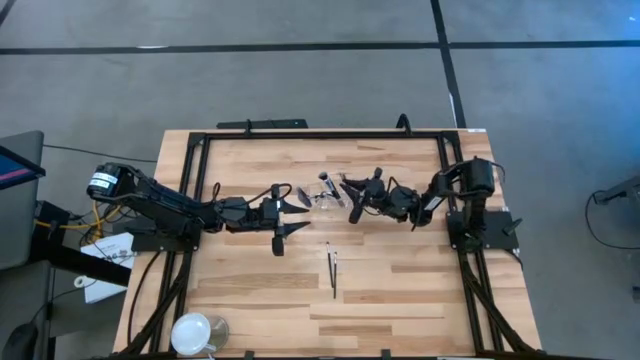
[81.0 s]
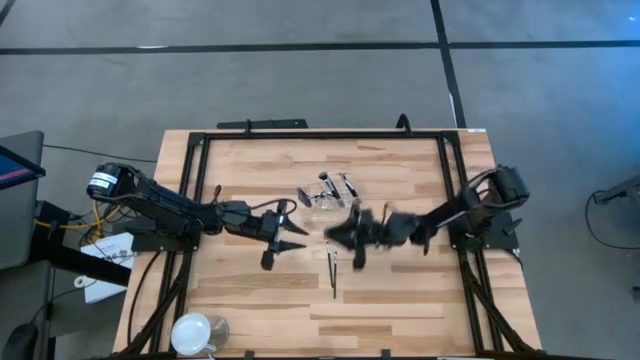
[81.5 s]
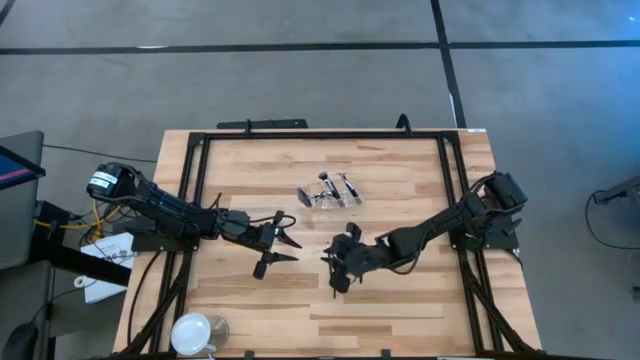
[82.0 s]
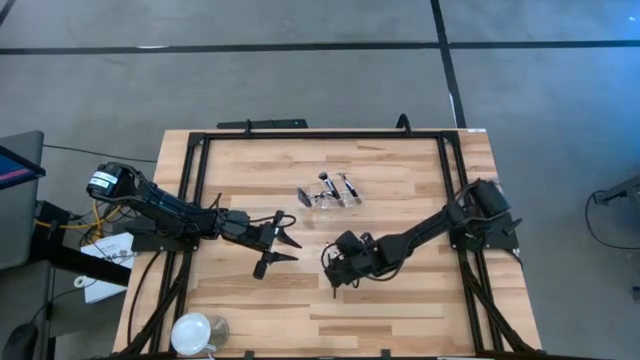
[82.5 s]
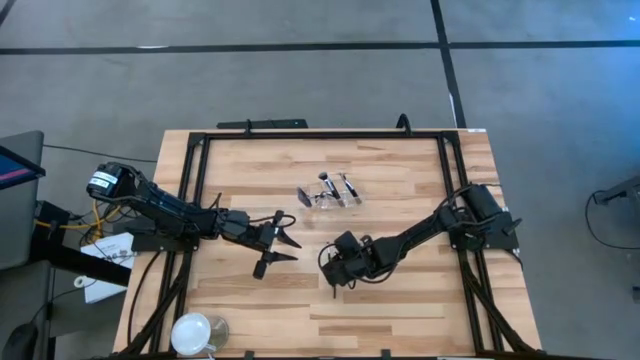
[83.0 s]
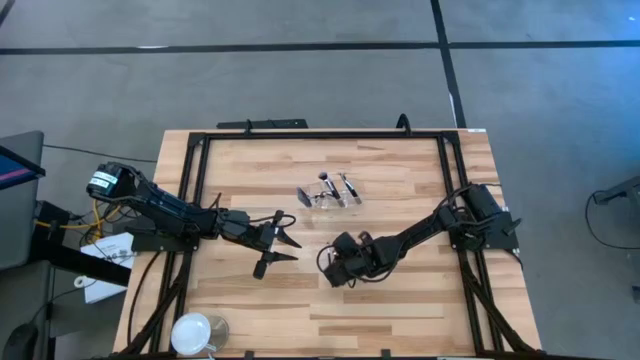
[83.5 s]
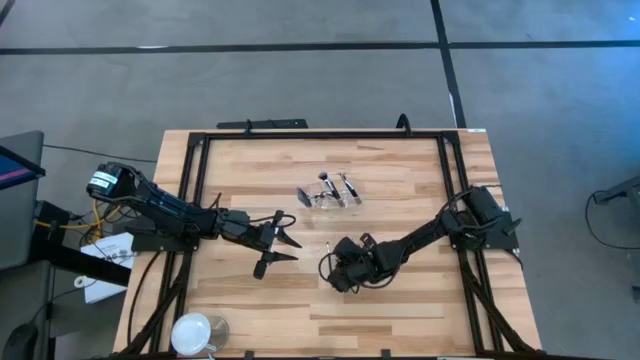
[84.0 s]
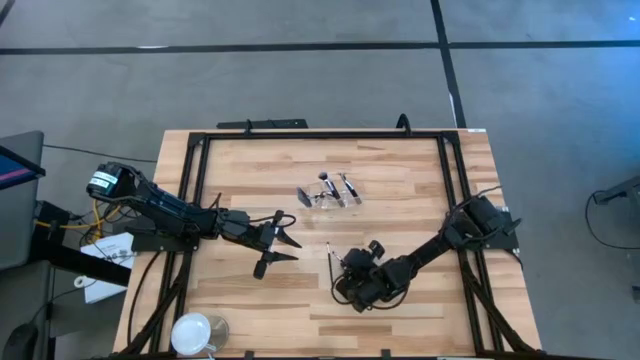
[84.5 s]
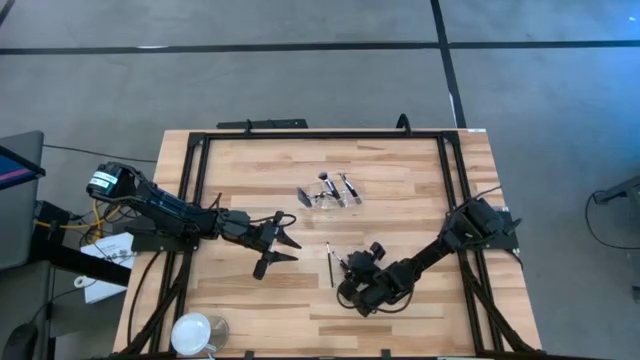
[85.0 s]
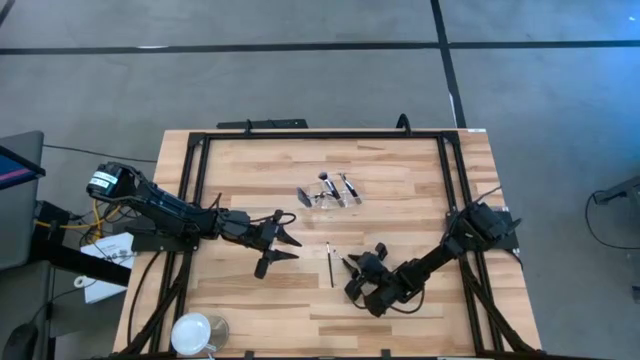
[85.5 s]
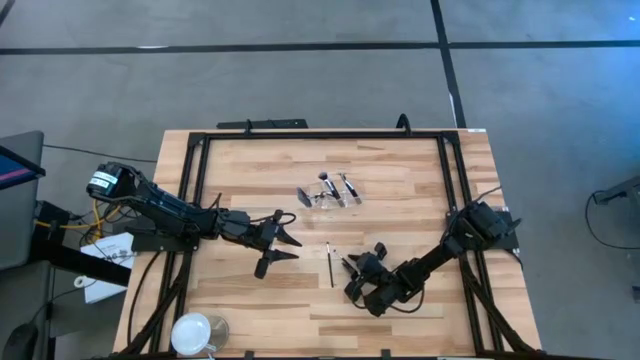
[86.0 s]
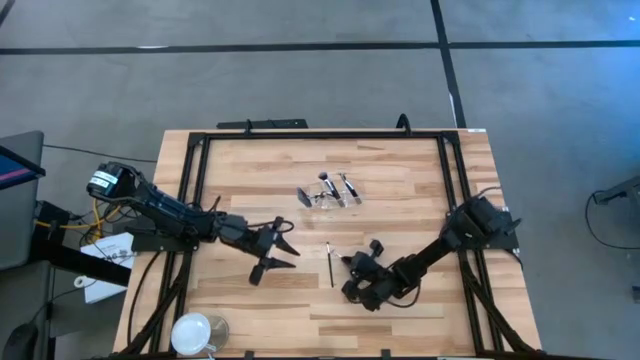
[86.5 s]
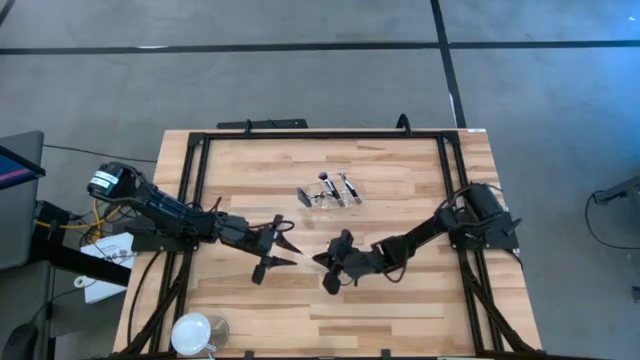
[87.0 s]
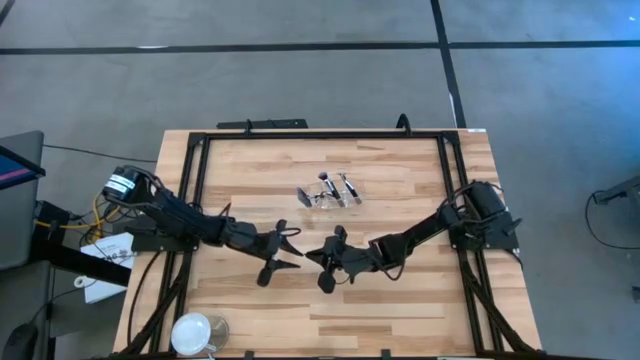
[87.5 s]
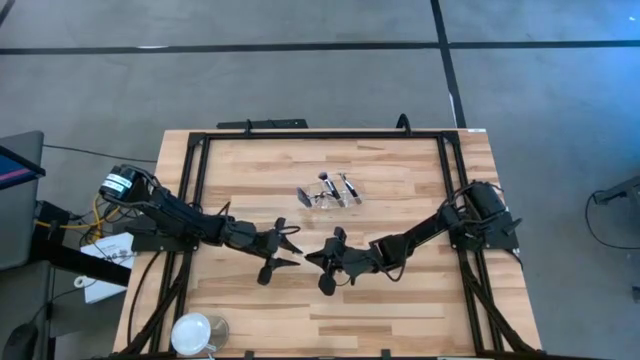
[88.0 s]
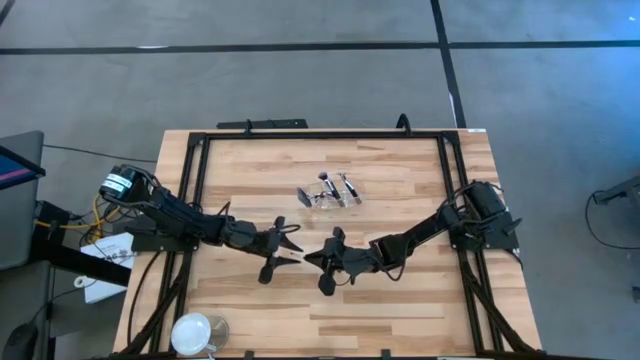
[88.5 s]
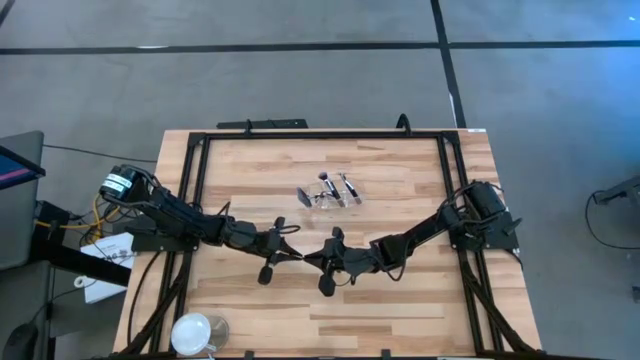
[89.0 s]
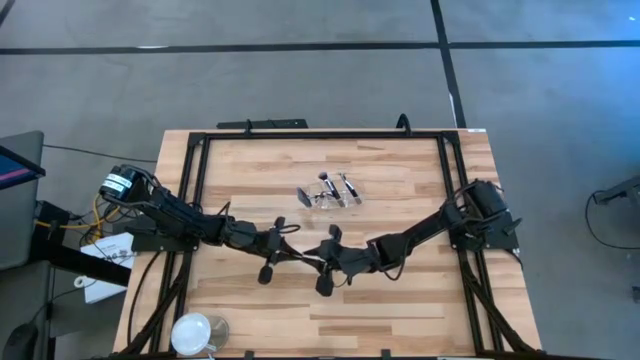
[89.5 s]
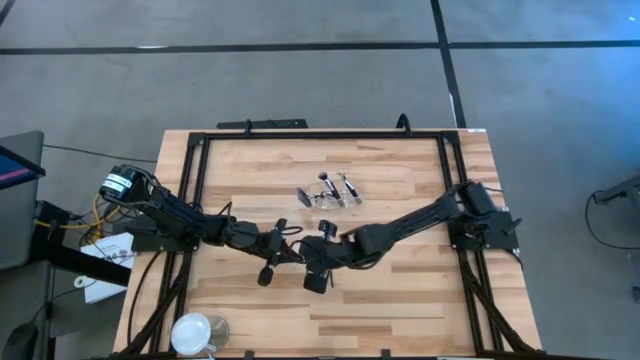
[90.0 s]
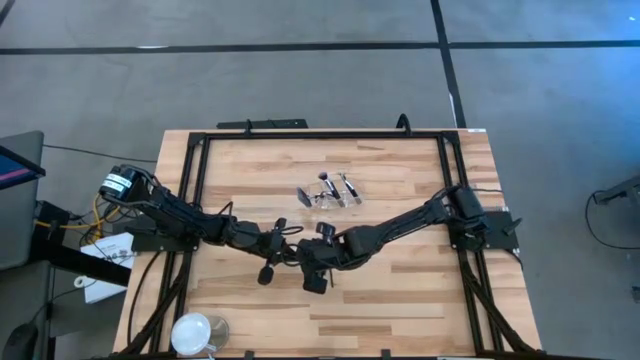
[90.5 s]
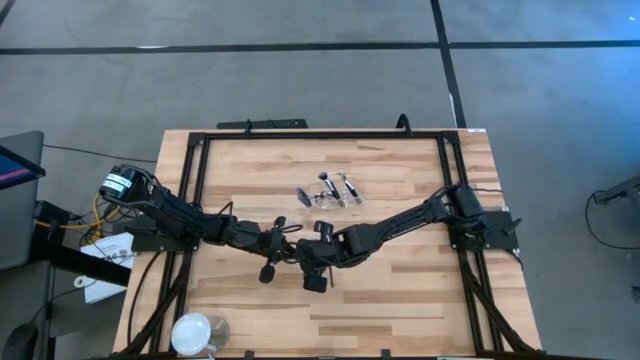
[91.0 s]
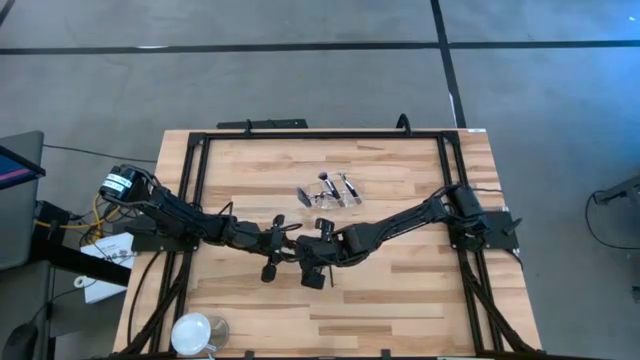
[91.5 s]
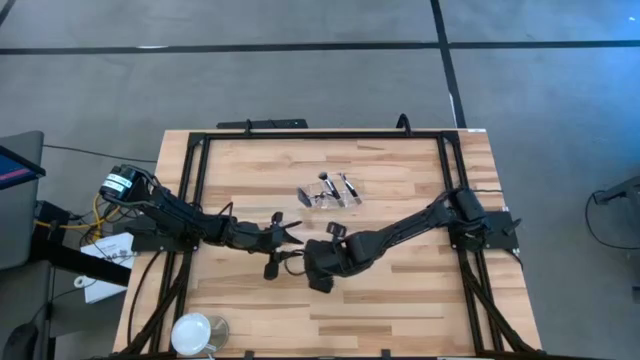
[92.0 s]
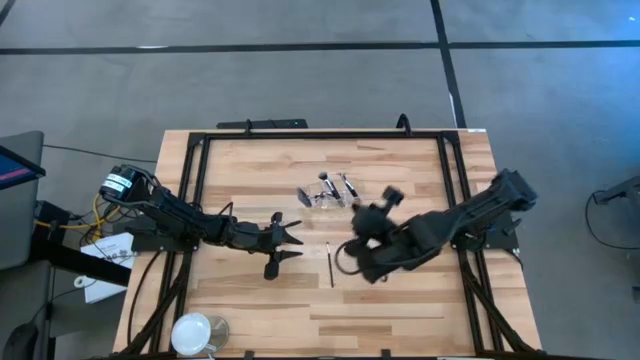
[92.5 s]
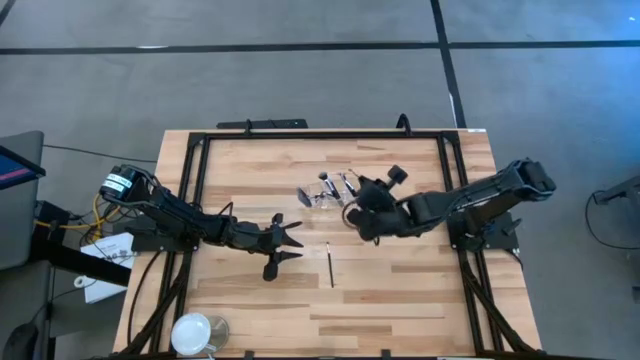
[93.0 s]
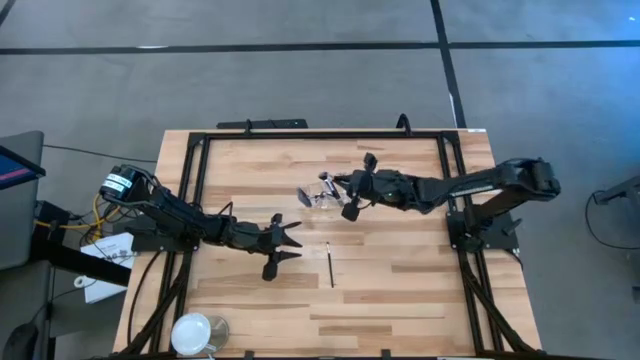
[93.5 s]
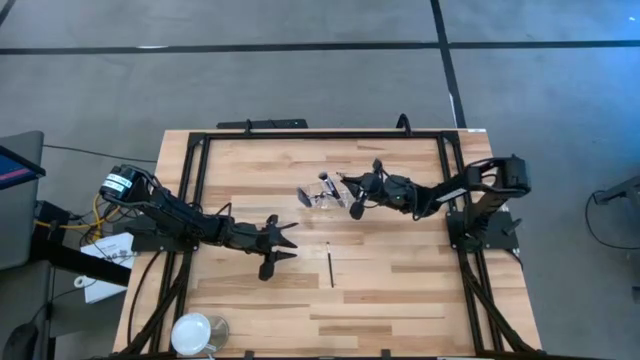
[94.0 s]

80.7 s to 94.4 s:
Task: Put items in baskets/containers
Put the eyeshadow brush into the right section of the transparent organizer

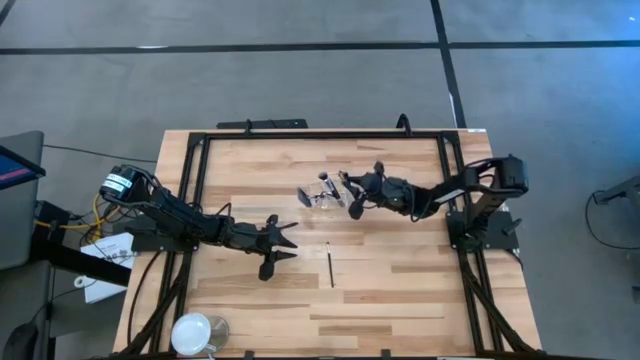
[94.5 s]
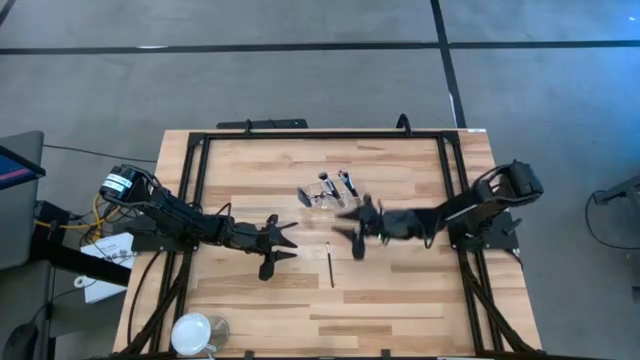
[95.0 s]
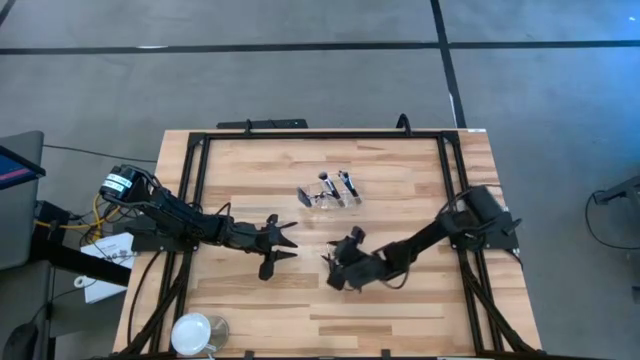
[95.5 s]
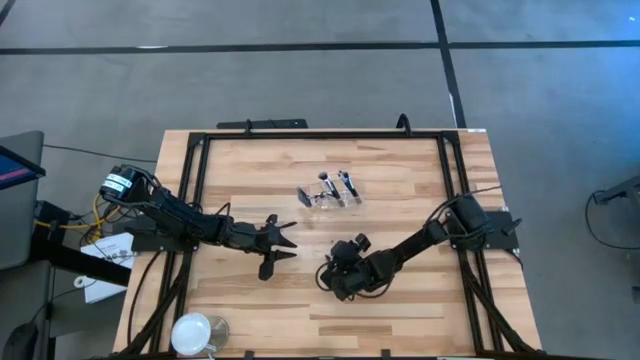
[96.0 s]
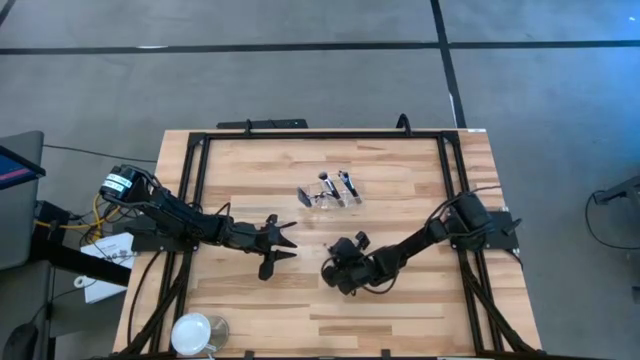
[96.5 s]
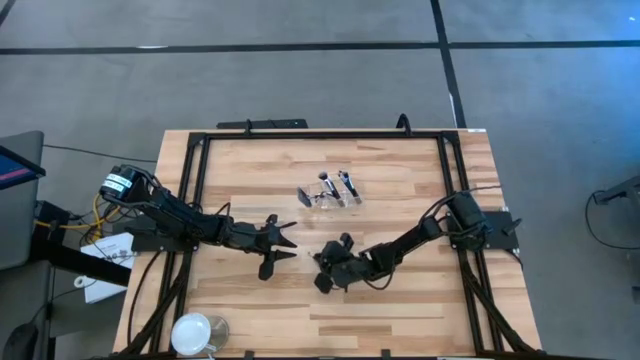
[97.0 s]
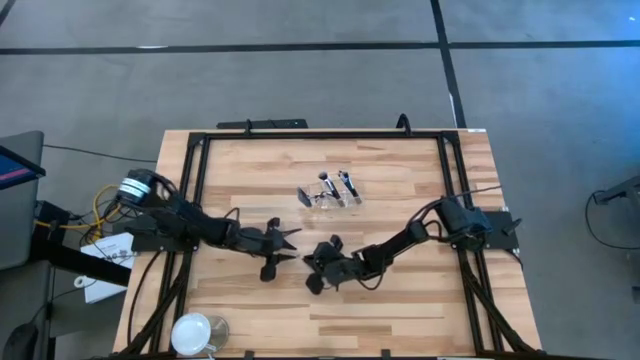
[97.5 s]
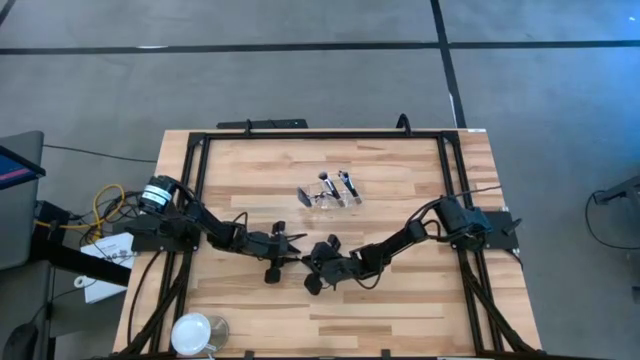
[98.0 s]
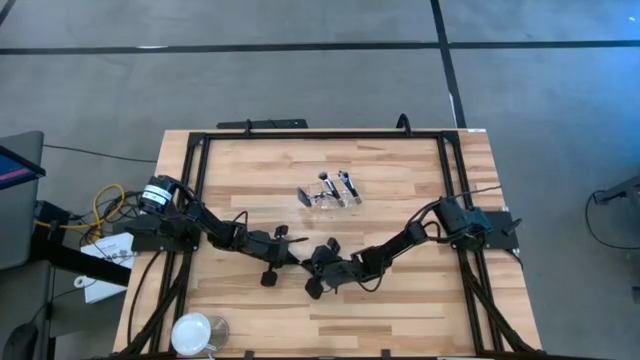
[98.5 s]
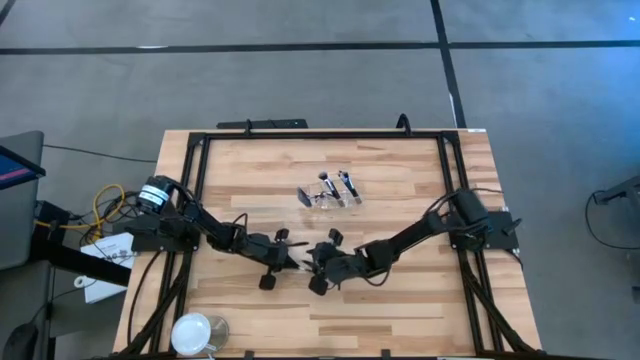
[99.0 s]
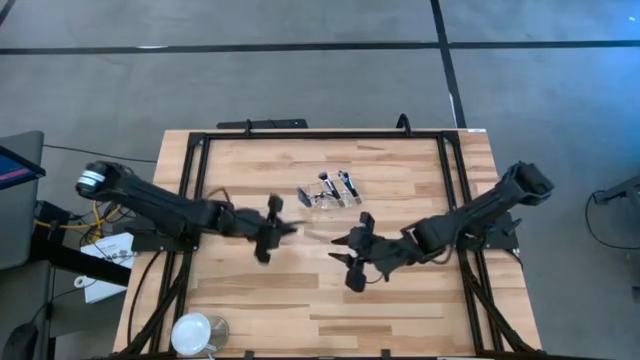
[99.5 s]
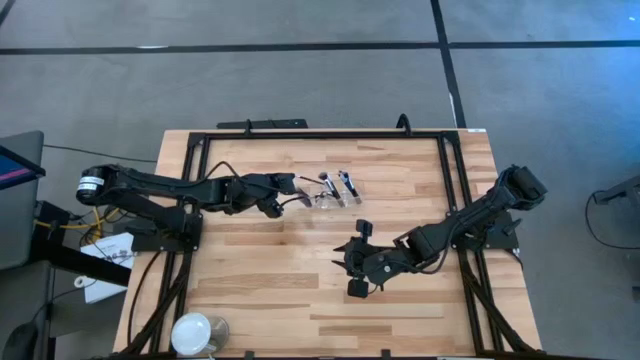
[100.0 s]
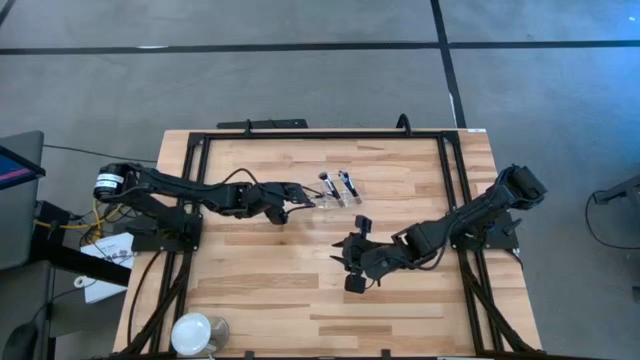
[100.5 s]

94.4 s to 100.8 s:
Put the eyeshadow brush into the left section of the transparent organizer

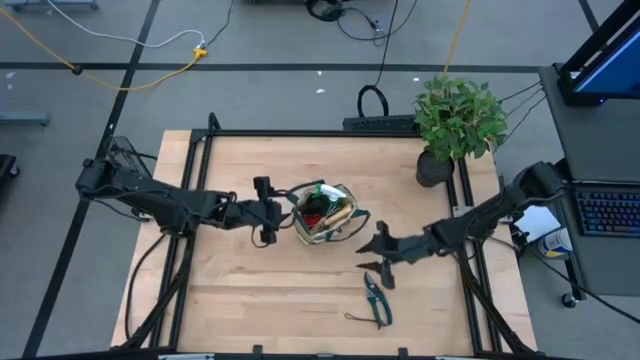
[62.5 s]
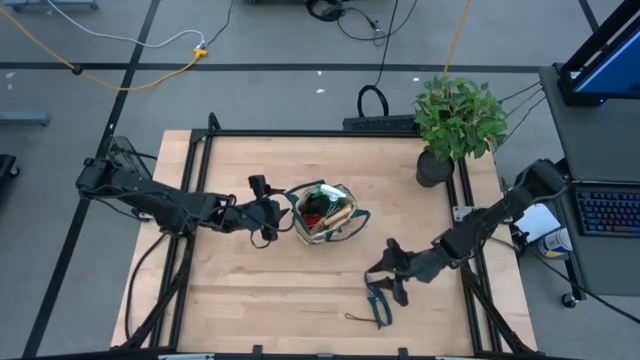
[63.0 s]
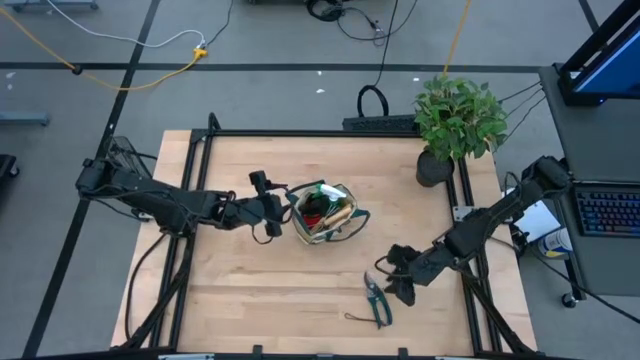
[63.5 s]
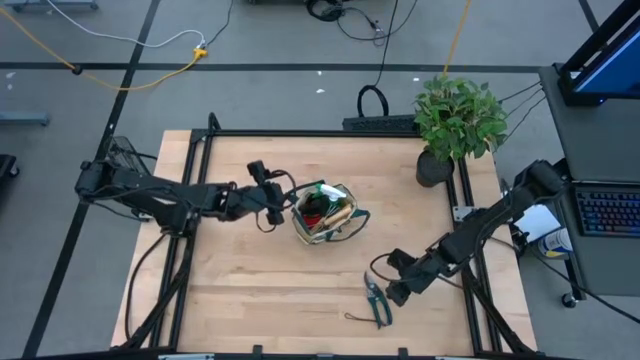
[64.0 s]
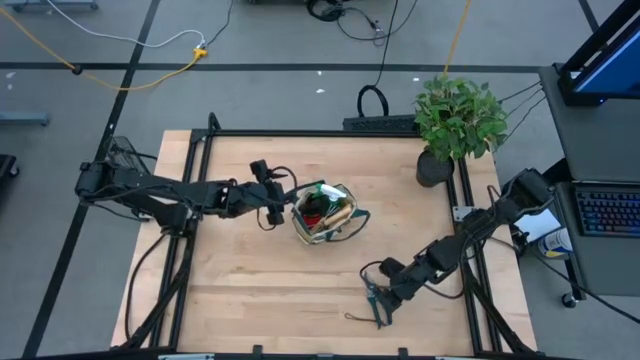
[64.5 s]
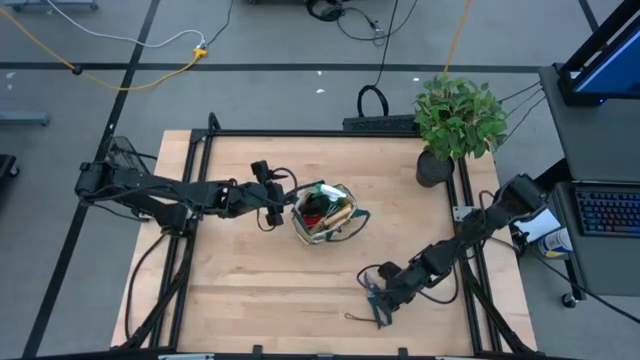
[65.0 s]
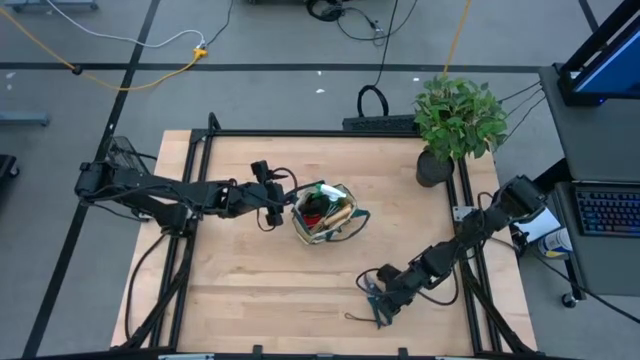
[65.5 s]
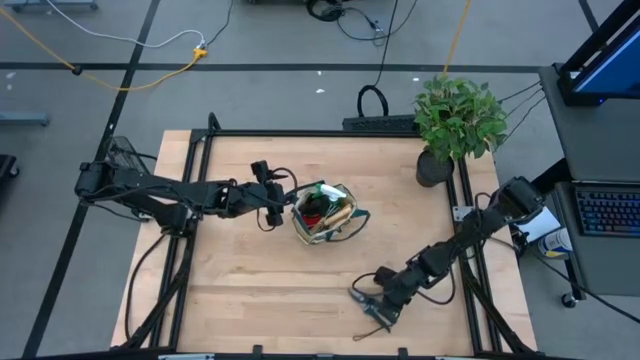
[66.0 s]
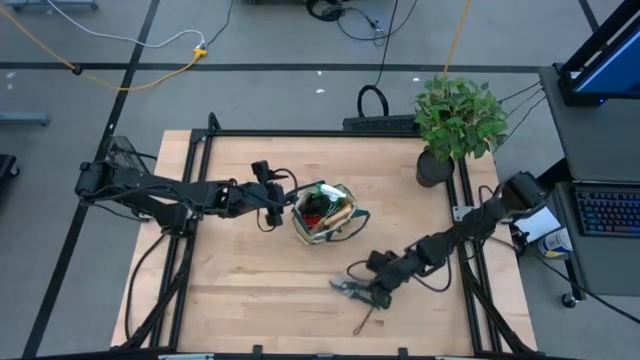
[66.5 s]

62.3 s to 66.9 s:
Task: Pick & Place Garden tools in Gardening bag
Put the green shear scissors into the green gardening bag
